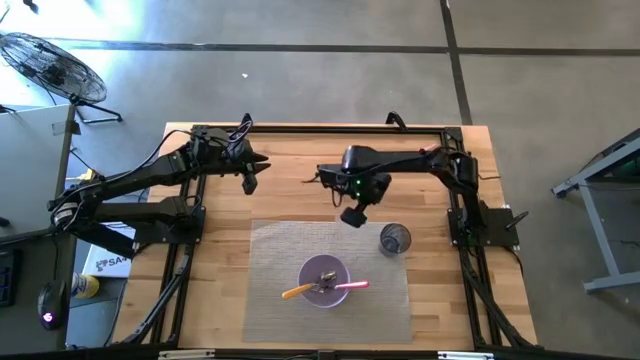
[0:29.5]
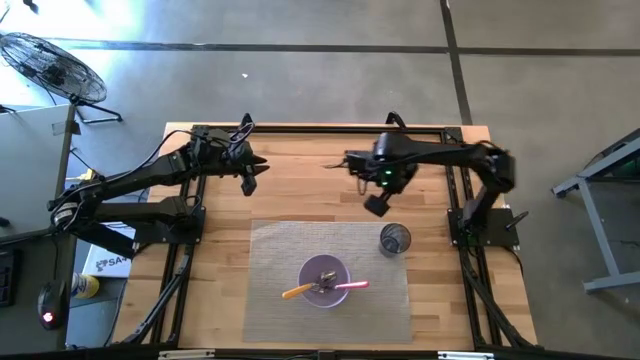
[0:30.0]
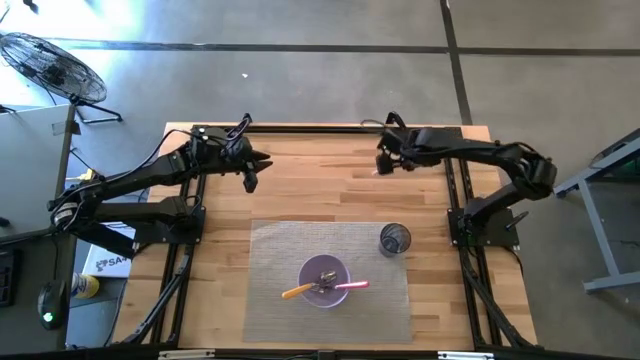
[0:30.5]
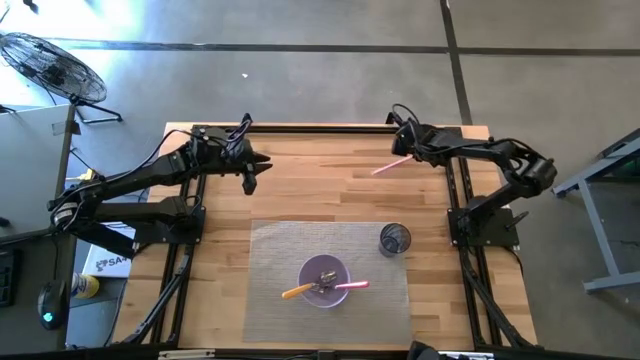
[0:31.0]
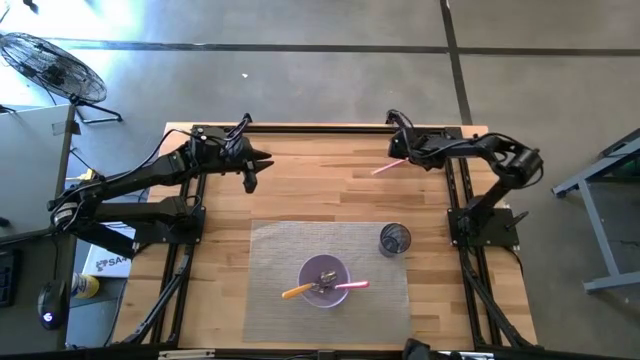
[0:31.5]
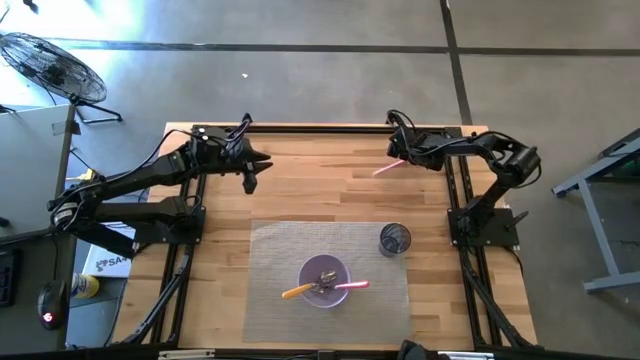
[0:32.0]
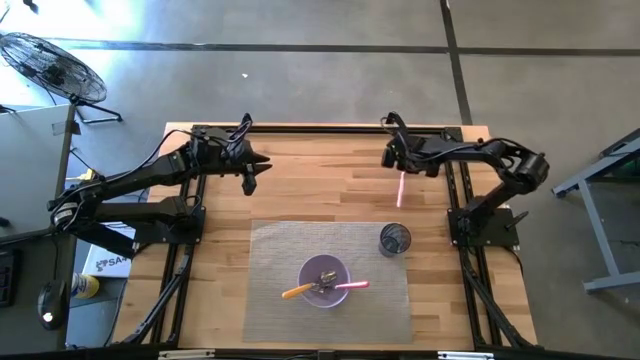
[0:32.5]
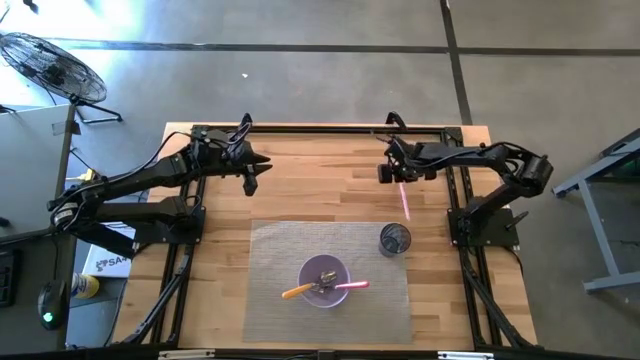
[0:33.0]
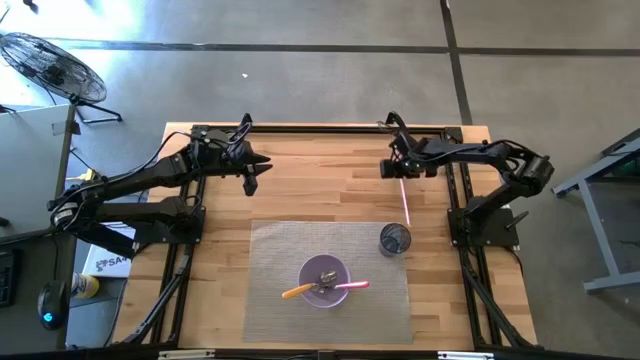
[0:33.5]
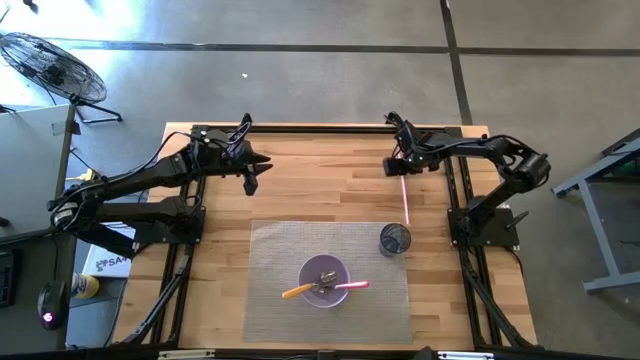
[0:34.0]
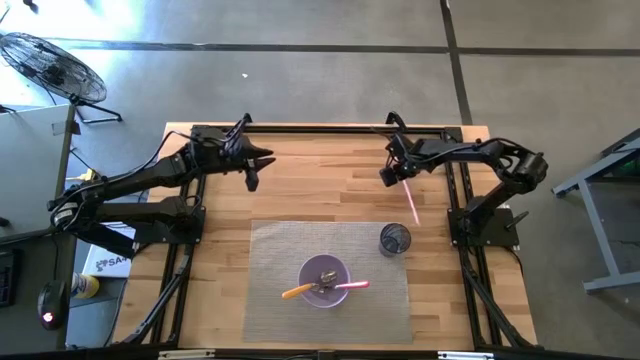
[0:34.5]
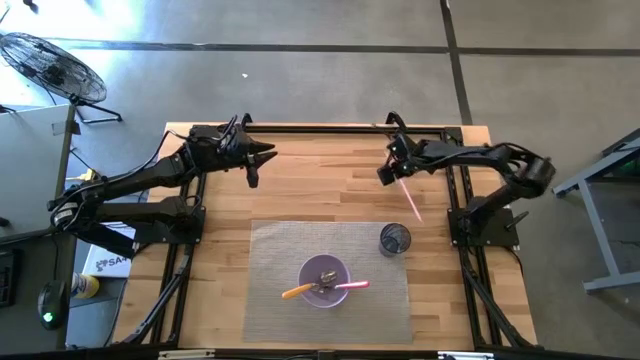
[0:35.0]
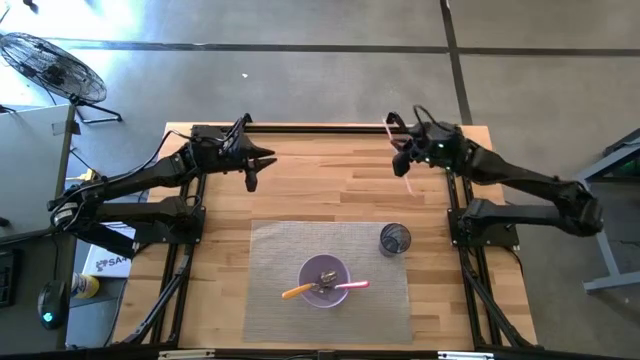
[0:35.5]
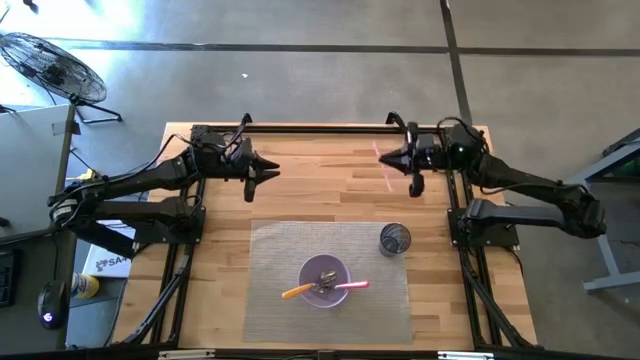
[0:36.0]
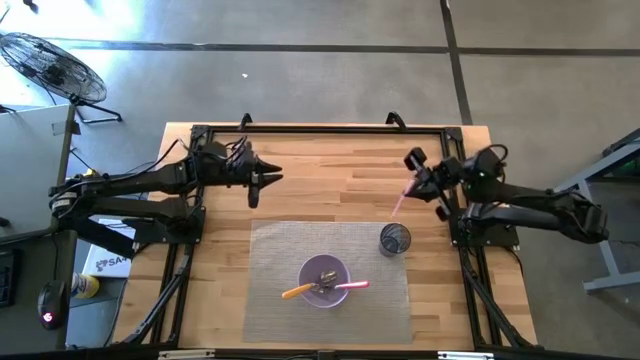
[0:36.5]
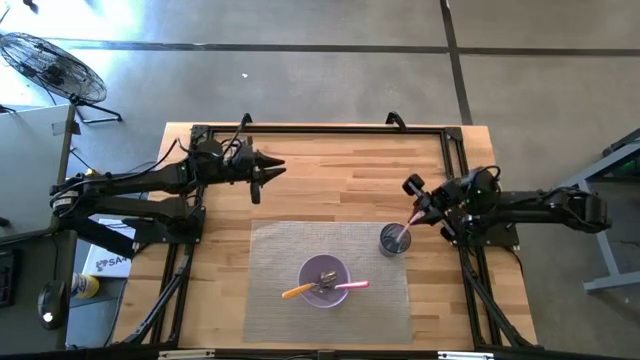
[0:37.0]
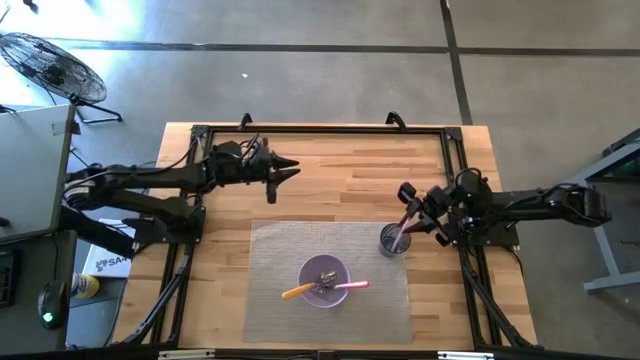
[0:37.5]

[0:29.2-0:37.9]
Task: Pick & Place Utensil
Put the pink straw into the blue cup on the gray mat

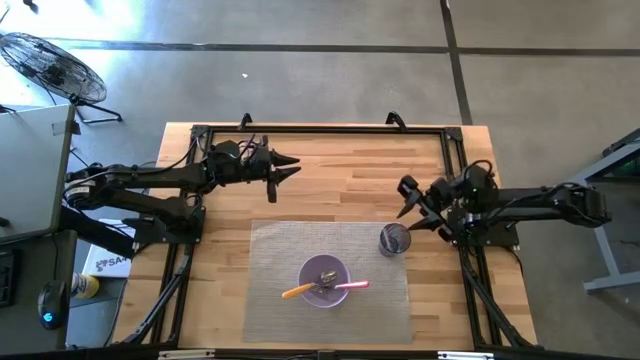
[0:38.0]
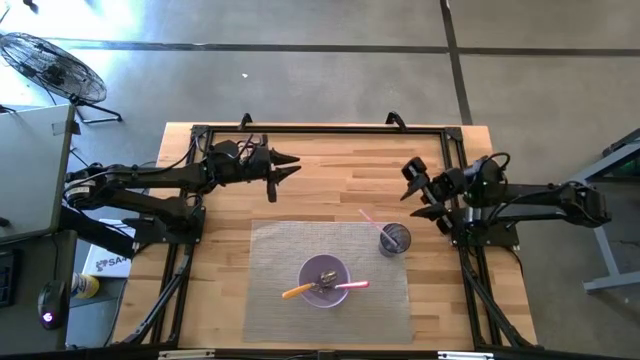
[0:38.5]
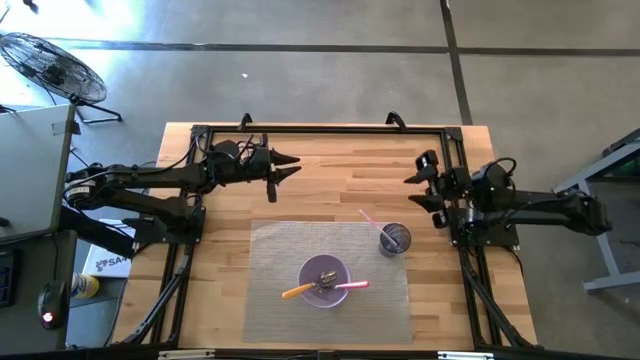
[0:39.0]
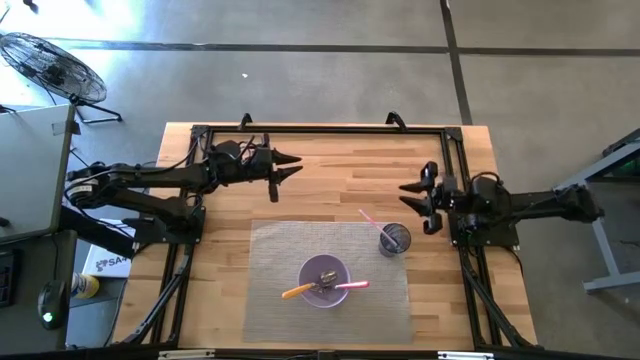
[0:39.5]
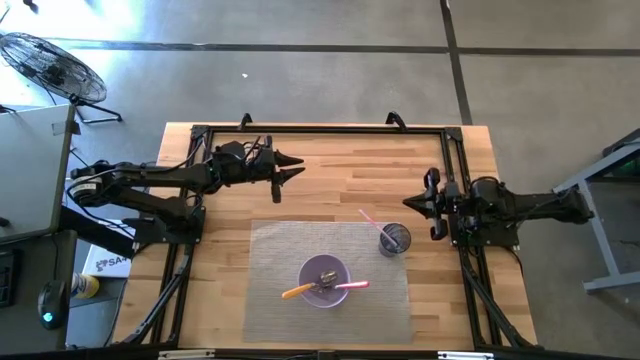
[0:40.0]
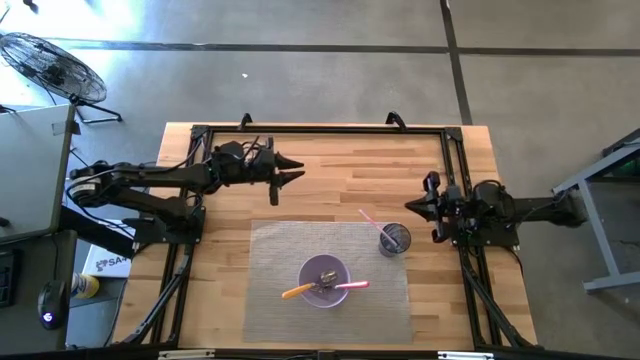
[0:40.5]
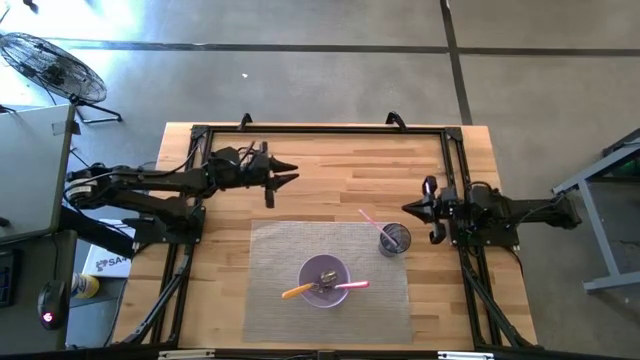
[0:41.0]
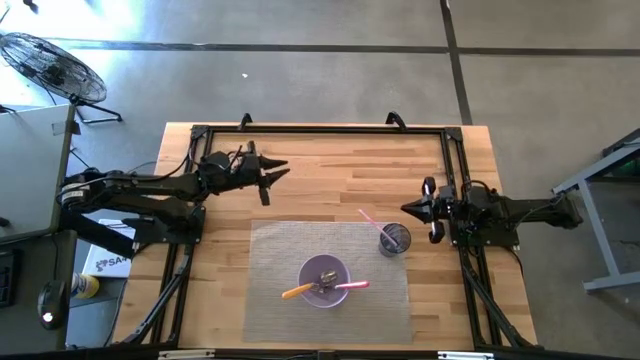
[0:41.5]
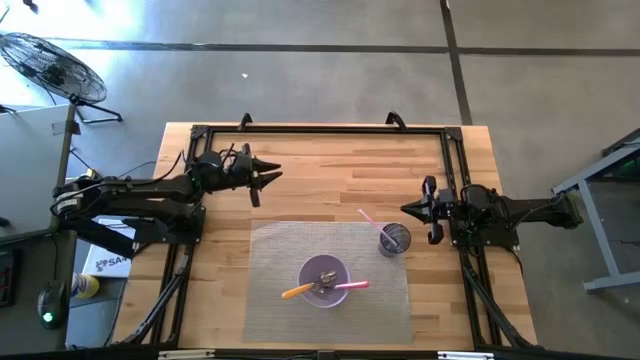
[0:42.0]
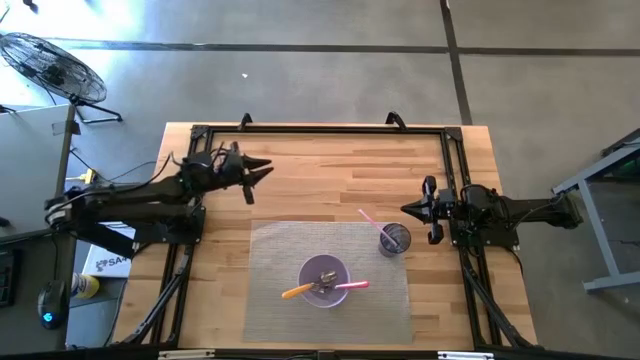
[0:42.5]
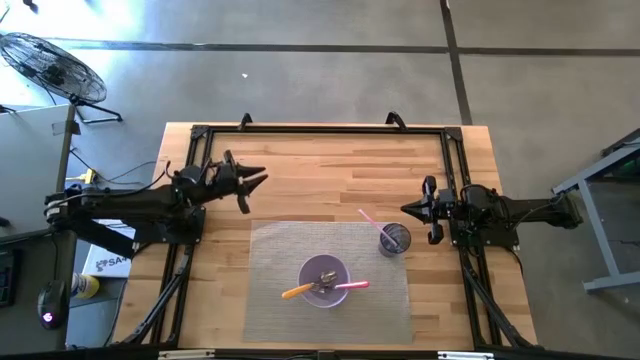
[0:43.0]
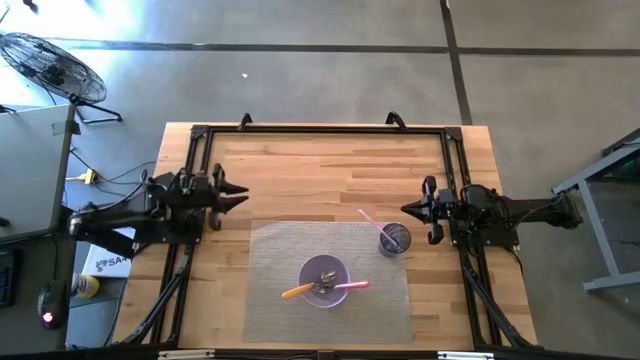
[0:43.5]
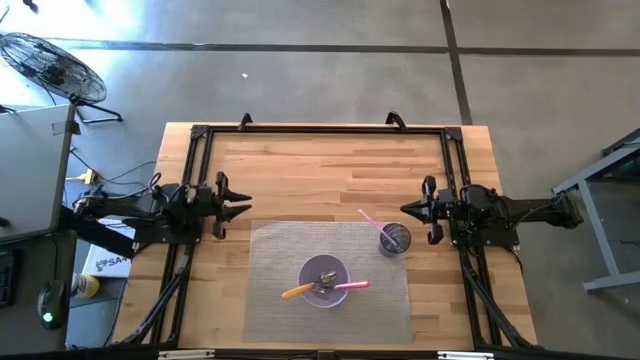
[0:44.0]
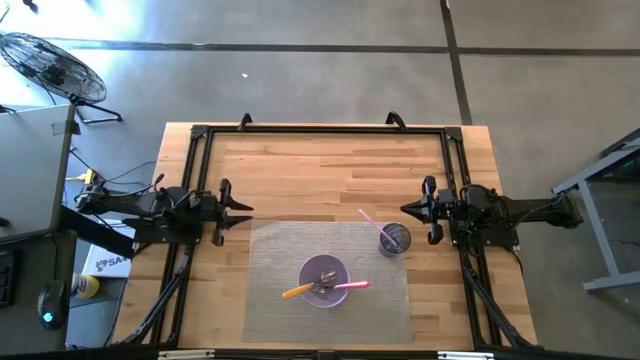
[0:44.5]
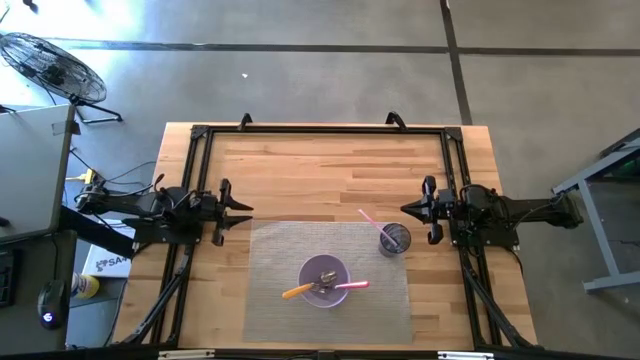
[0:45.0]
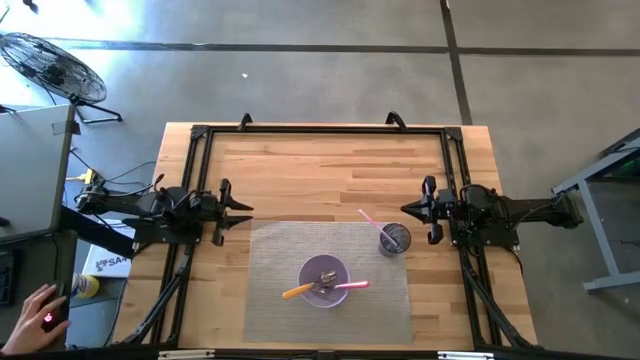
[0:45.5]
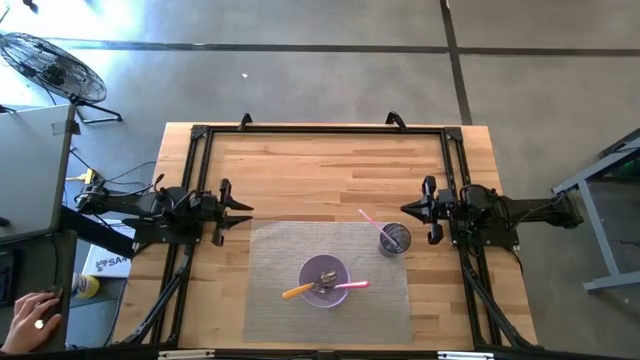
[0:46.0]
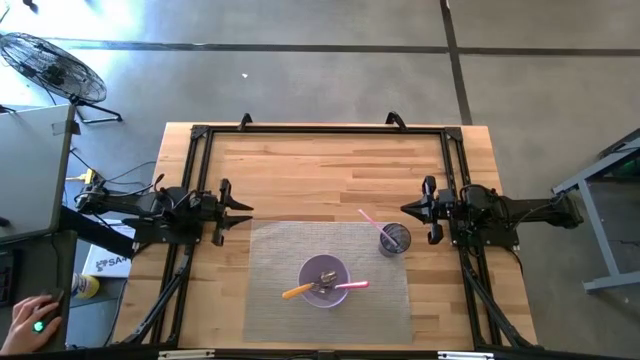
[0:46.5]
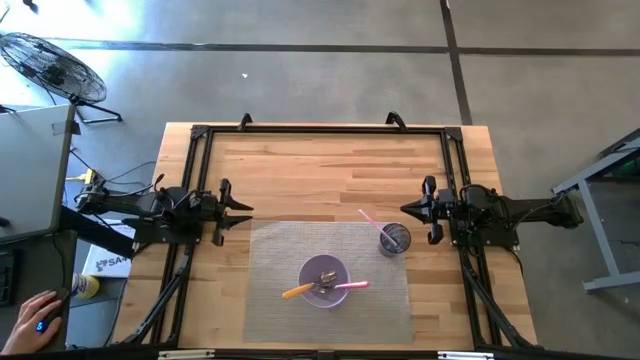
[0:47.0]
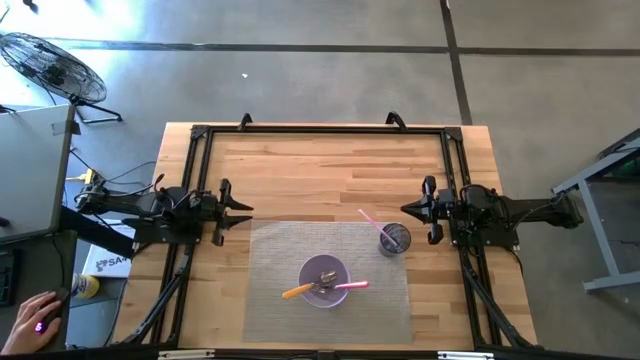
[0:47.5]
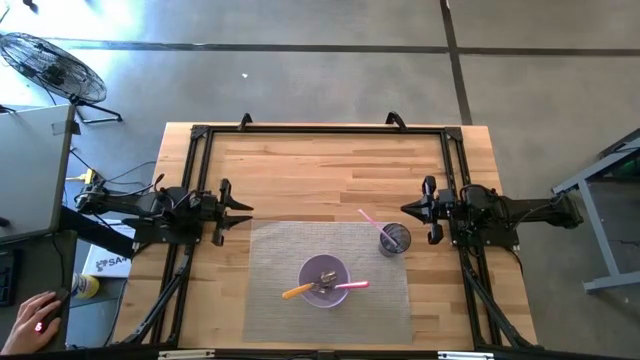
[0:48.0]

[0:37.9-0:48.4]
Return to Home Position

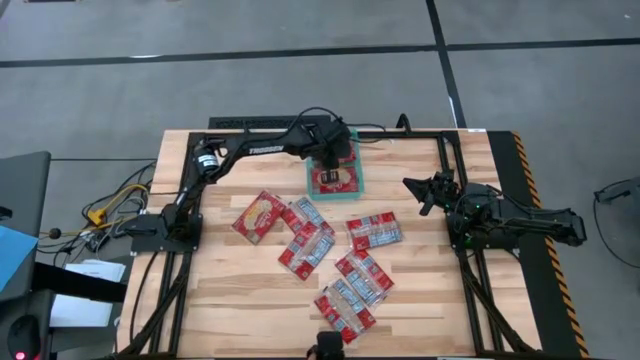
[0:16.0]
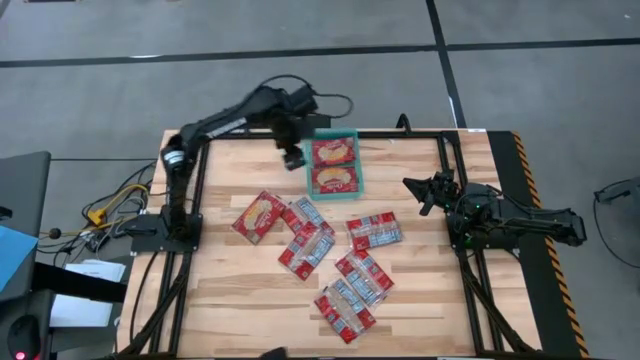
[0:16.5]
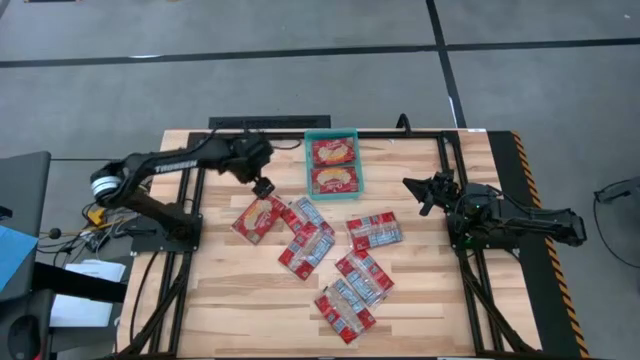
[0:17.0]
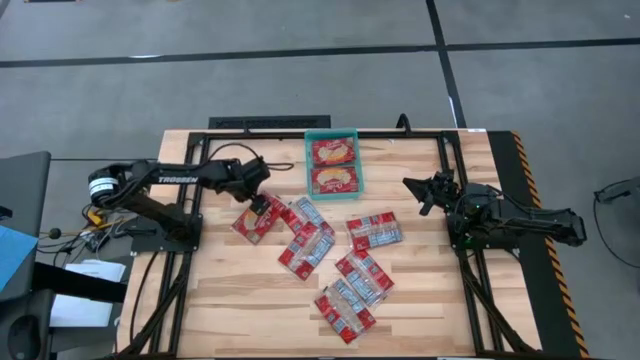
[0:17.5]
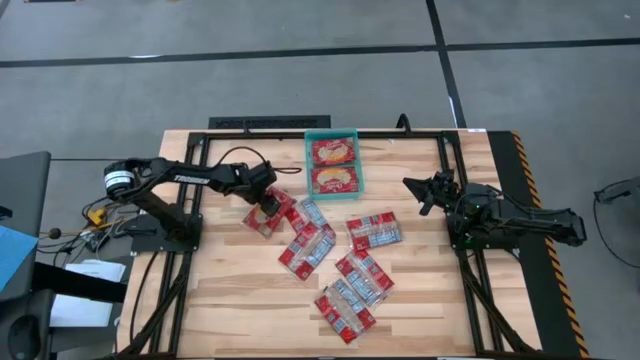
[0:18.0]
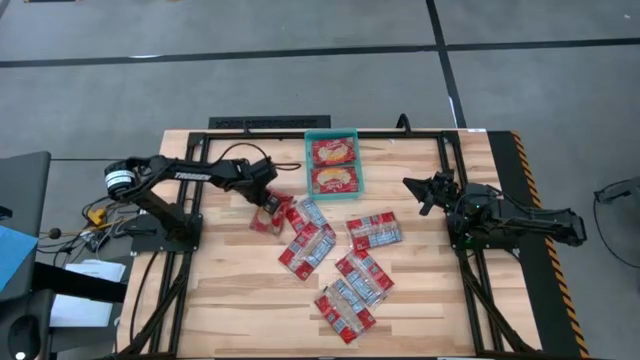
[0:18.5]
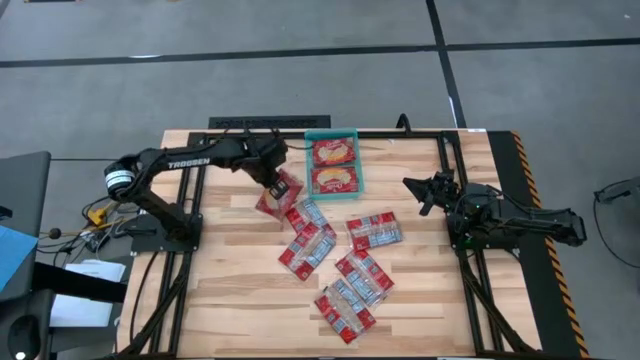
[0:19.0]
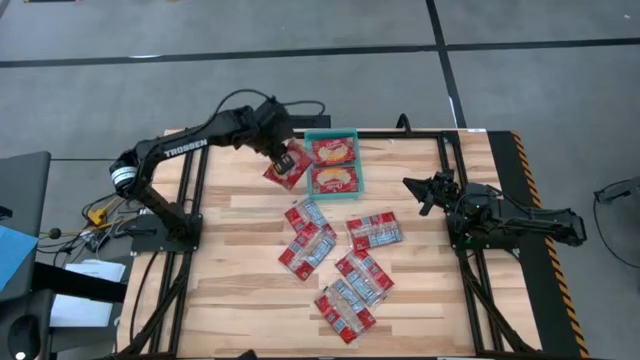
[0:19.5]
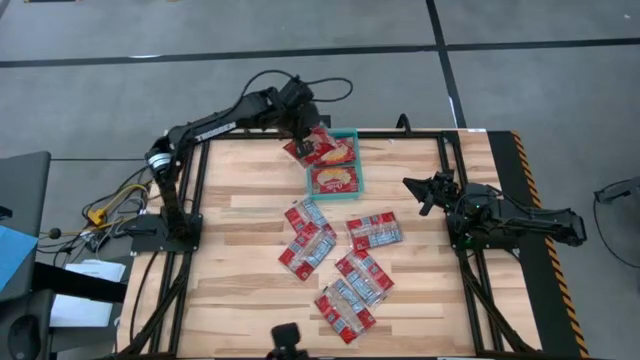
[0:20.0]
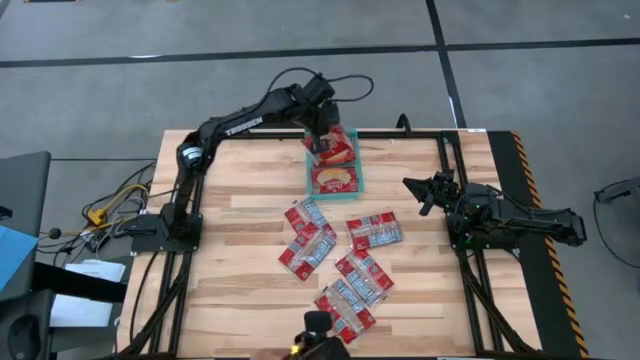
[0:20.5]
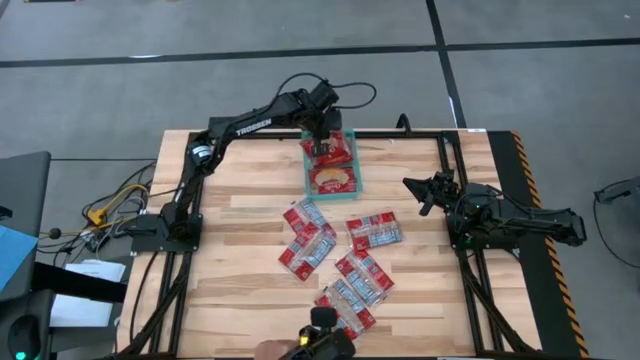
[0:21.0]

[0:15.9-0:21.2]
Task: Sort popcorn bags into baskets
Put the red popcorn bag into the green bin
